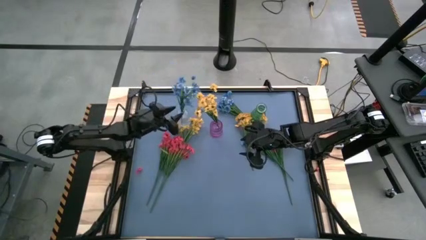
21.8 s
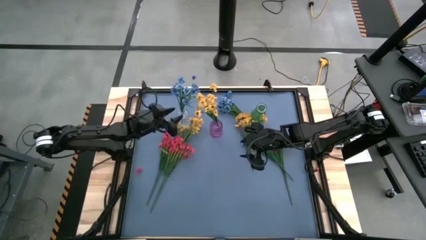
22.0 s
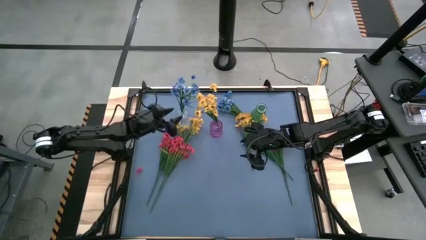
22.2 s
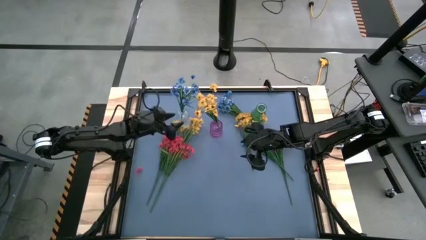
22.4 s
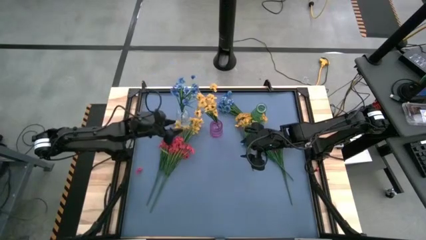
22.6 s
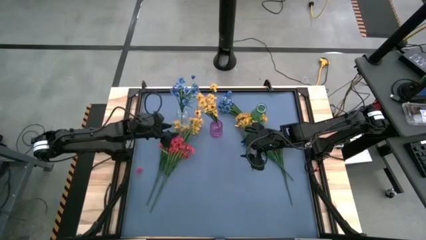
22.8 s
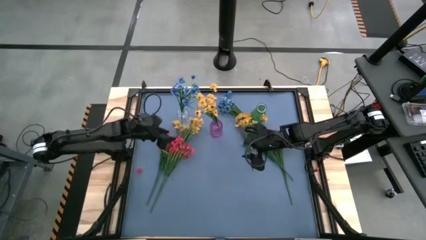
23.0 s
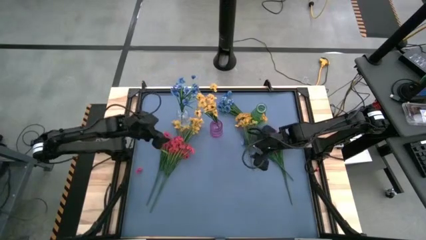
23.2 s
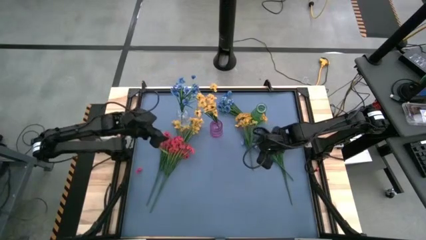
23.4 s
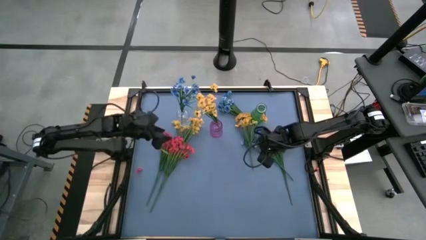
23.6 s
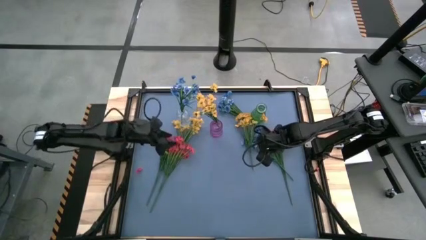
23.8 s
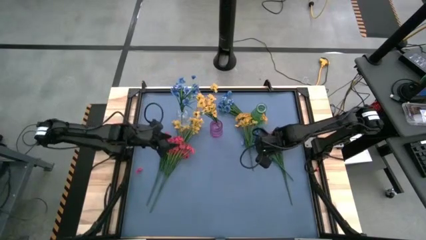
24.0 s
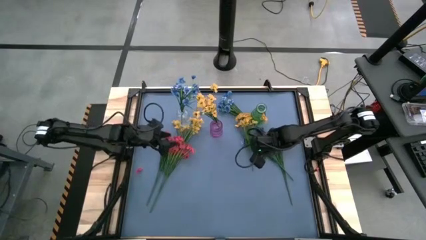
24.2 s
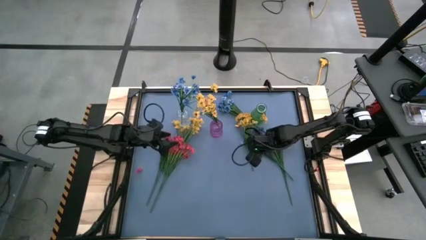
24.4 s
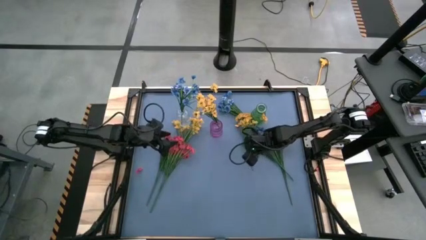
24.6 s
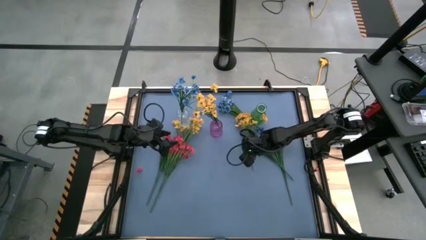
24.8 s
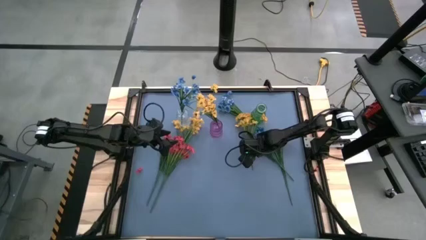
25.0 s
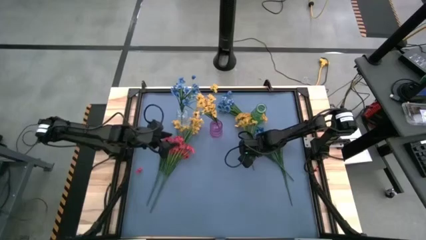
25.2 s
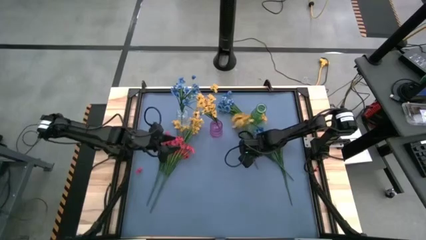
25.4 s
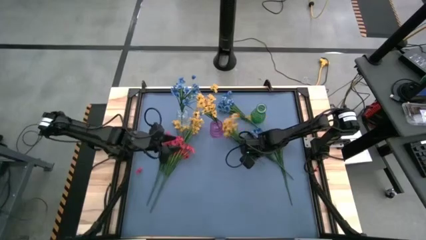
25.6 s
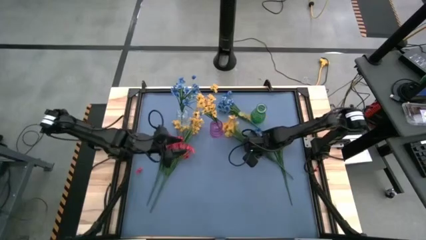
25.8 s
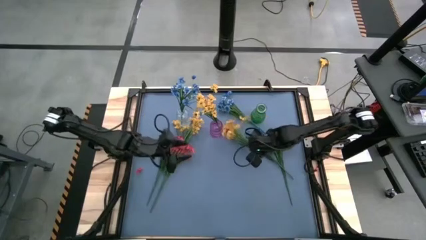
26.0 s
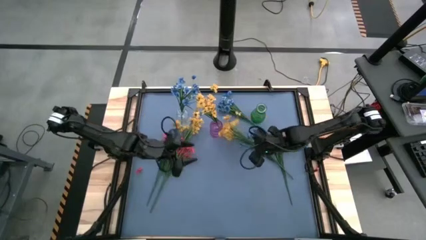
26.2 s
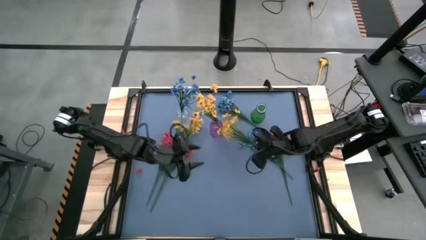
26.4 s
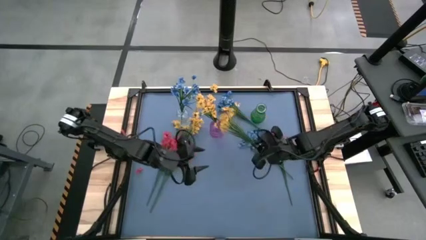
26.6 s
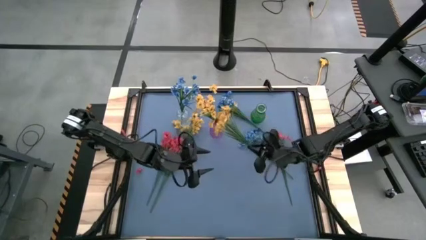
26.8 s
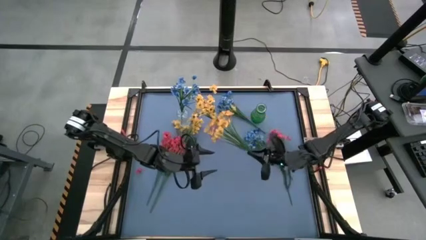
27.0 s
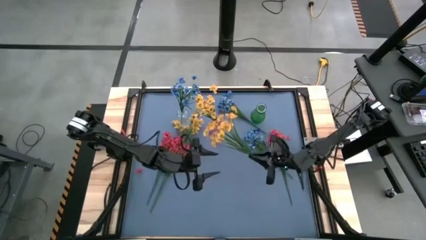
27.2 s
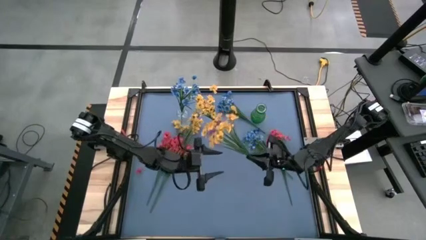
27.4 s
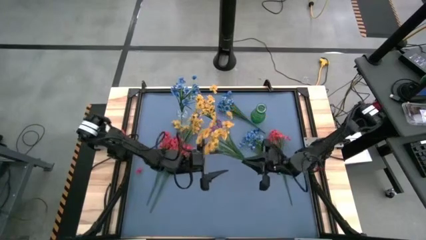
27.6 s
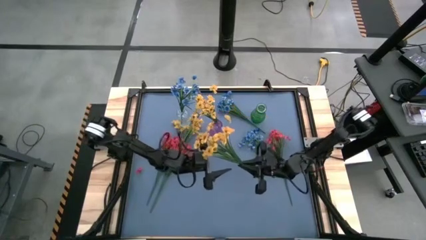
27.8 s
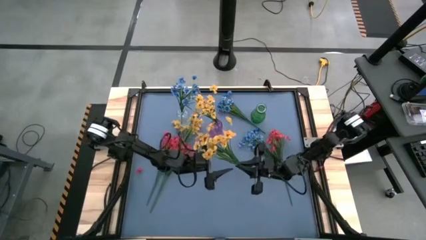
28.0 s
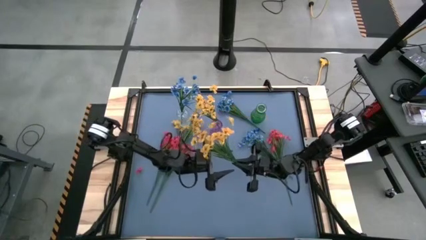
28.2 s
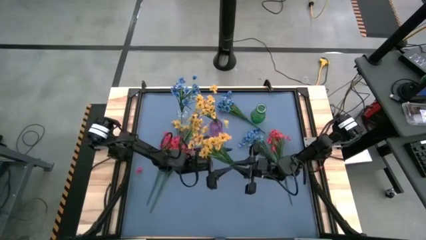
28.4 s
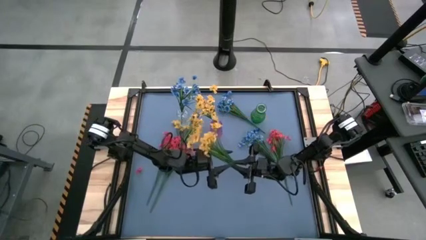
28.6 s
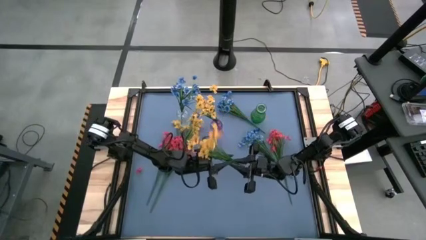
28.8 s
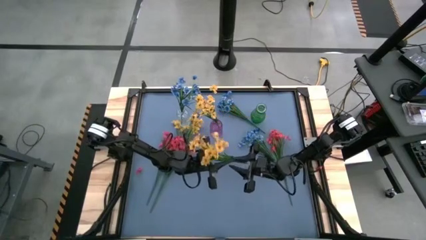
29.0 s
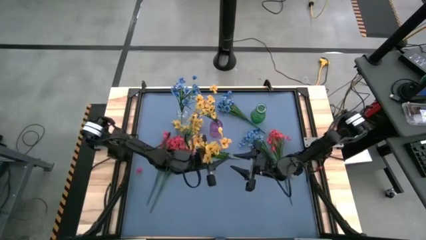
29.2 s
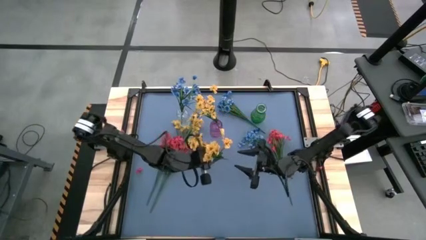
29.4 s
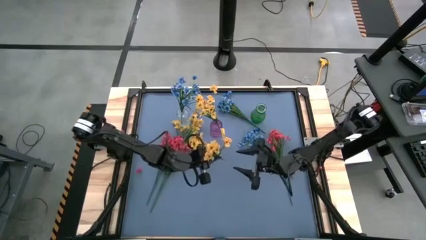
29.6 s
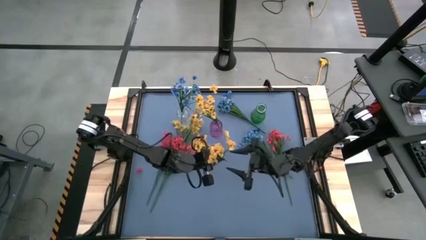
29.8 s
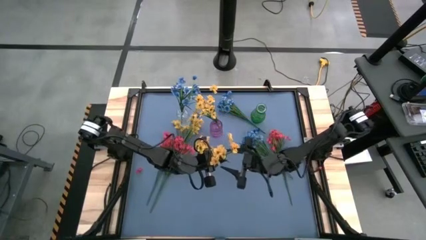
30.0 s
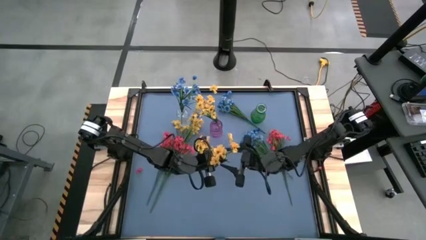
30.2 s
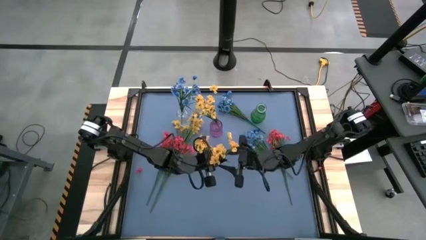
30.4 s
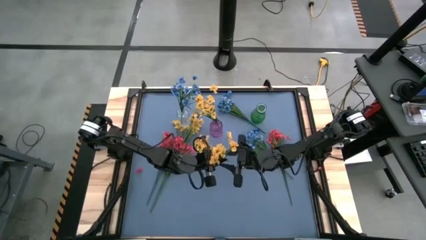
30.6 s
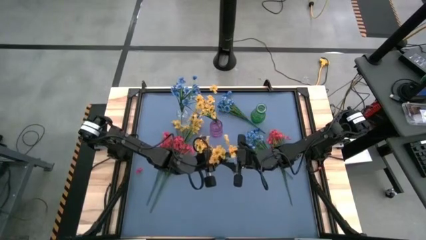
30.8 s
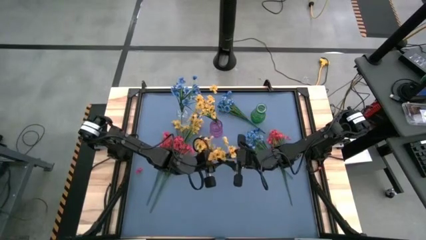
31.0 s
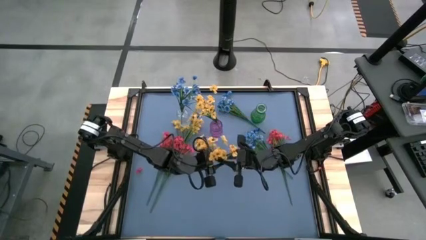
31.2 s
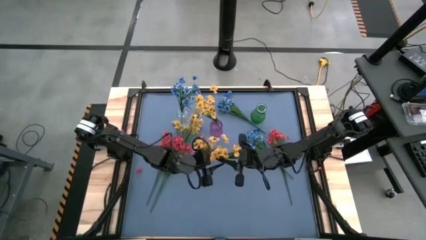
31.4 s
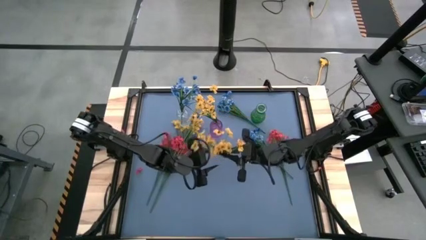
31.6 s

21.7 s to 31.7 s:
Task: Sort flowers into vase by color
Put the right yellow flowers into the violet vase

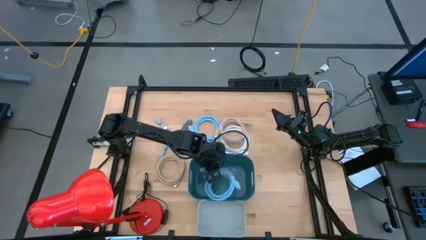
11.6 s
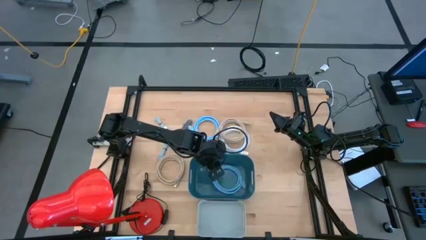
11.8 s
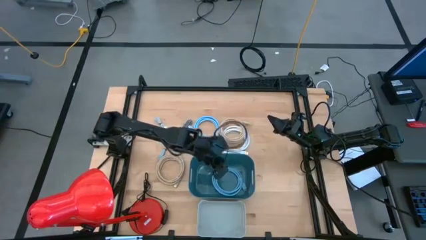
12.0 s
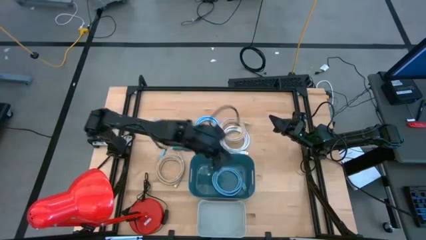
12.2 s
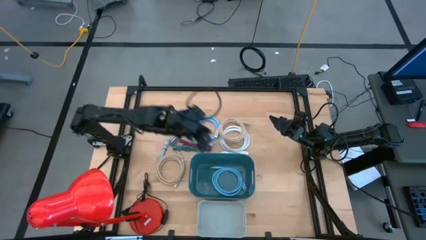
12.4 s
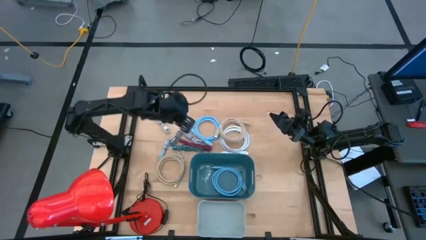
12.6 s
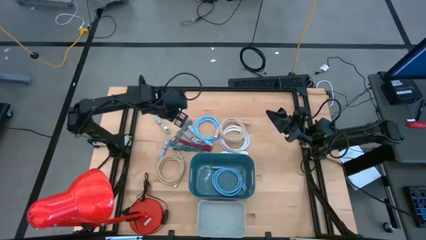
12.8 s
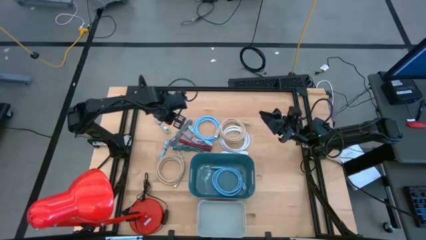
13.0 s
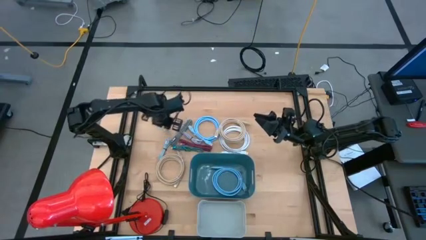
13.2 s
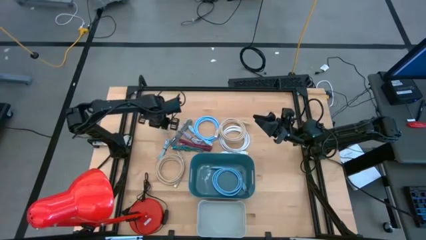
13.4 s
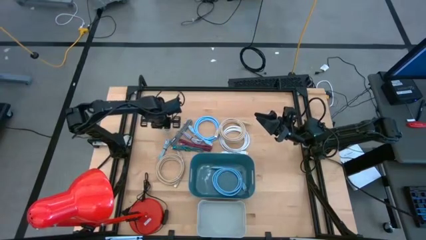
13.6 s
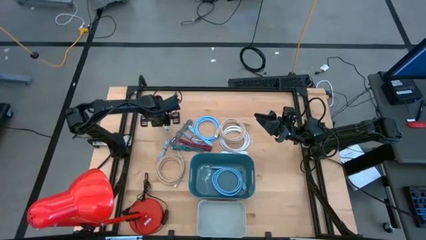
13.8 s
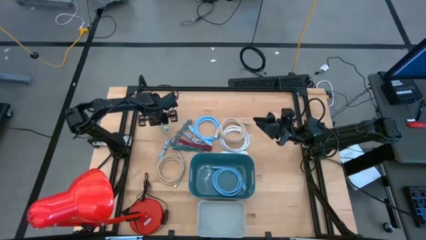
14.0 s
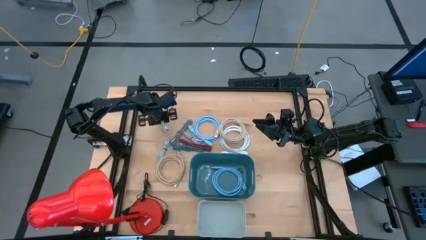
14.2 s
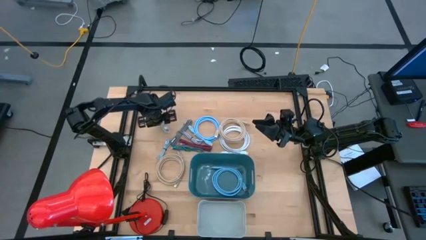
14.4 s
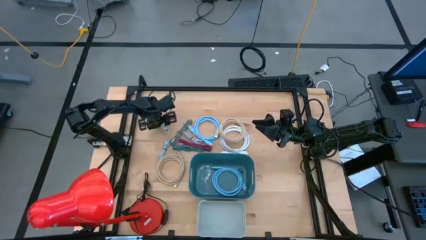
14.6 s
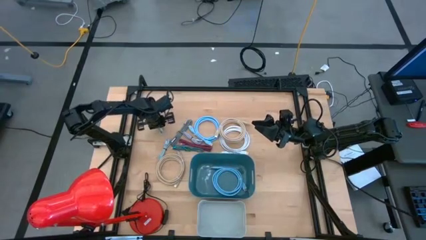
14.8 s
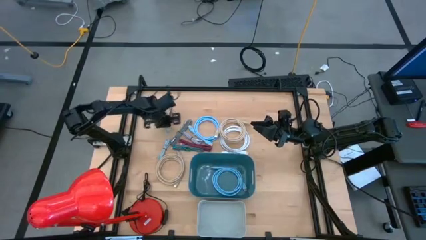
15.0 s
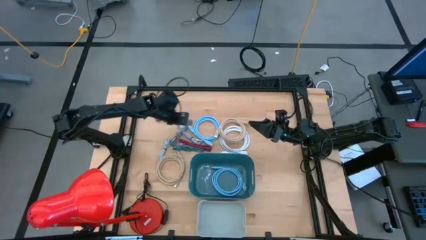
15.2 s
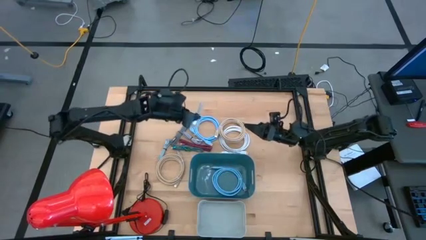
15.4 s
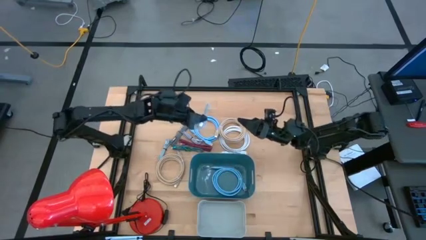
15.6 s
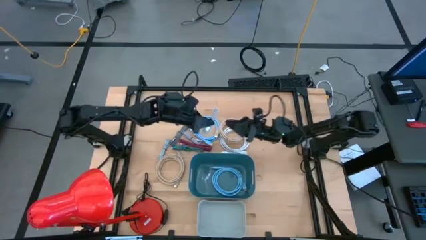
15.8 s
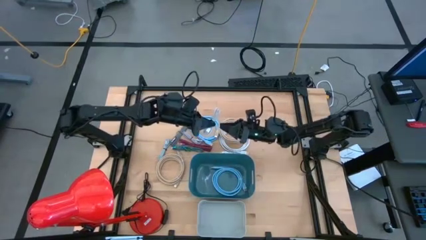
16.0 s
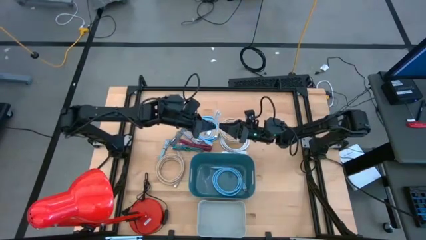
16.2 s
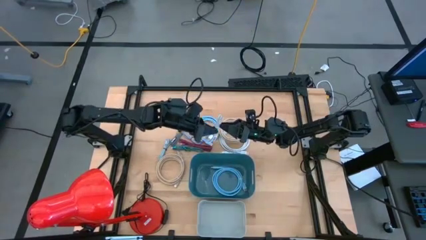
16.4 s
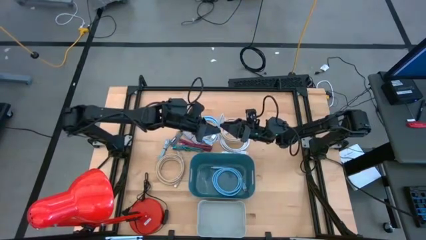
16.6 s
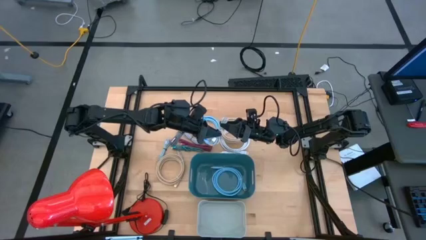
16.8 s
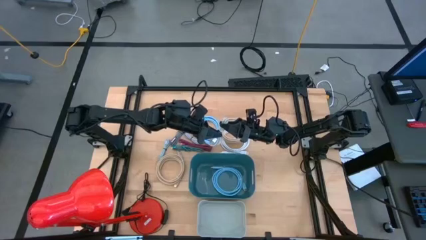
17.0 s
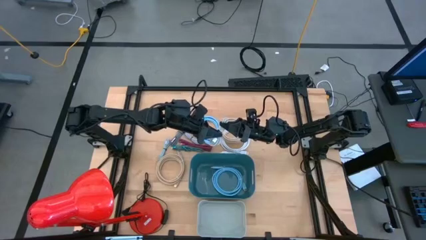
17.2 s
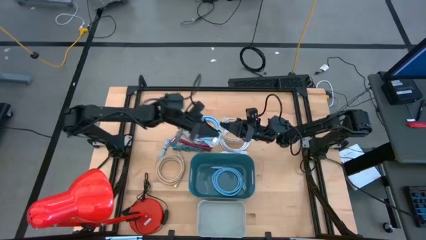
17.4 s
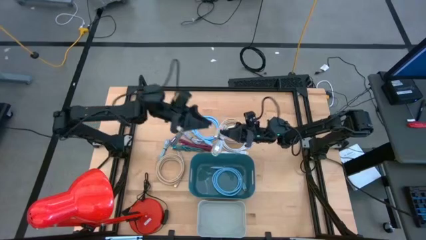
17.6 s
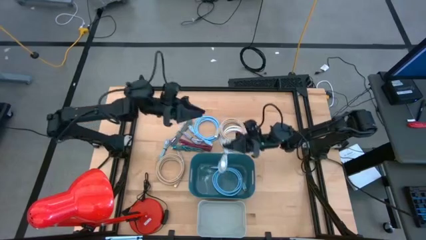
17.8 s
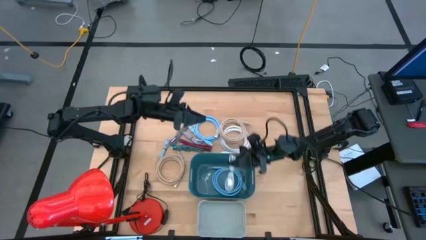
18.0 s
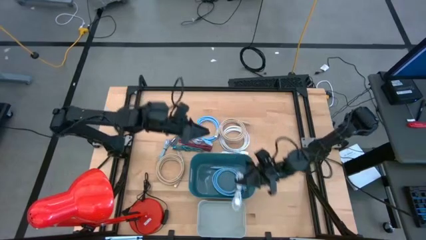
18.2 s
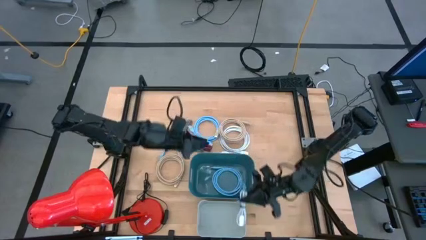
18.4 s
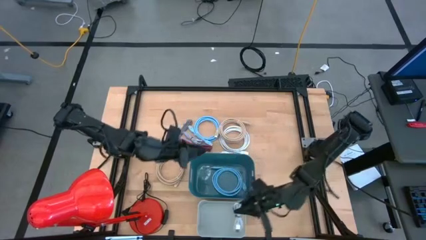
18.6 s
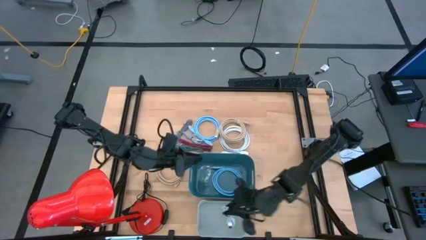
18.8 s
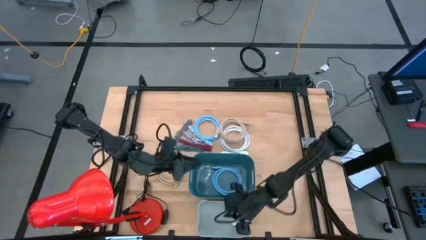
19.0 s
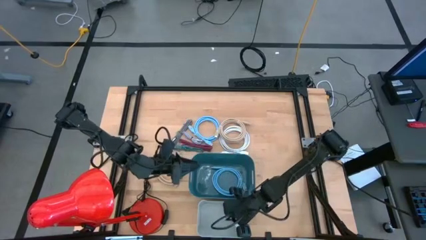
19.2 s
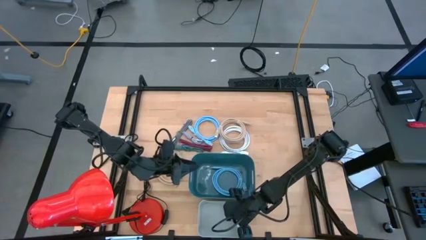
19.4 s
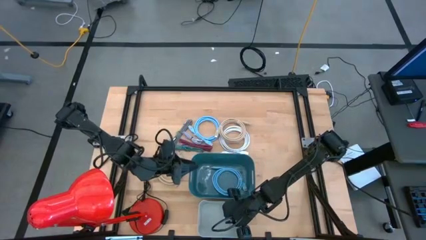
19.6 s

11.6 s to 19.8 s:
Task: Pick & Place USB Port
Put the top white USB cable into the gray bin
